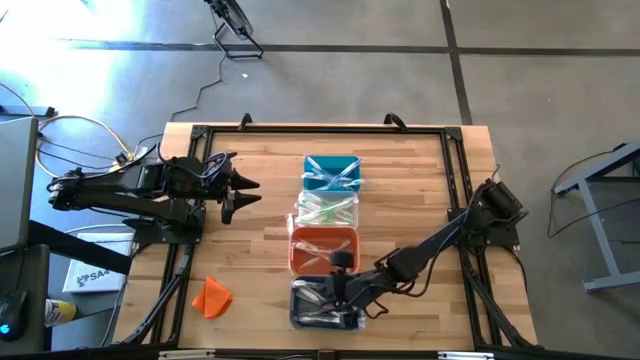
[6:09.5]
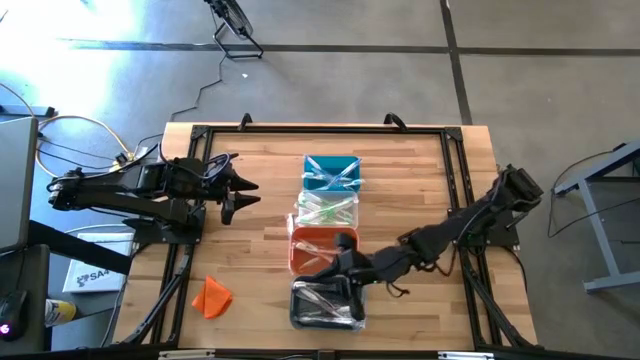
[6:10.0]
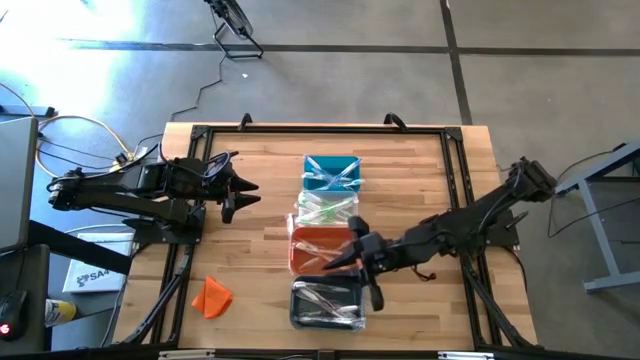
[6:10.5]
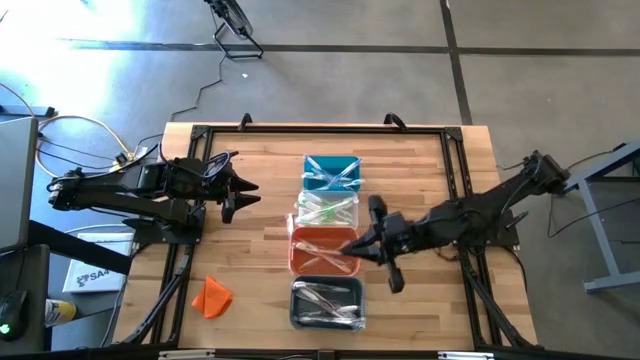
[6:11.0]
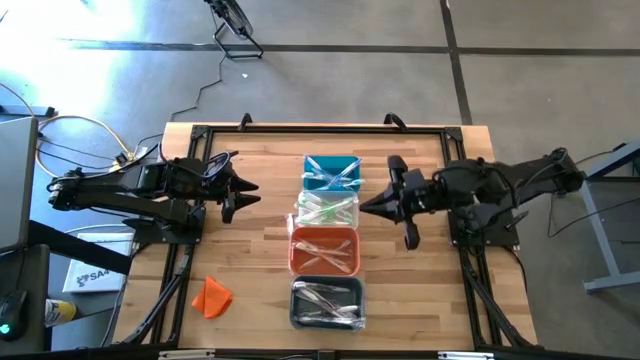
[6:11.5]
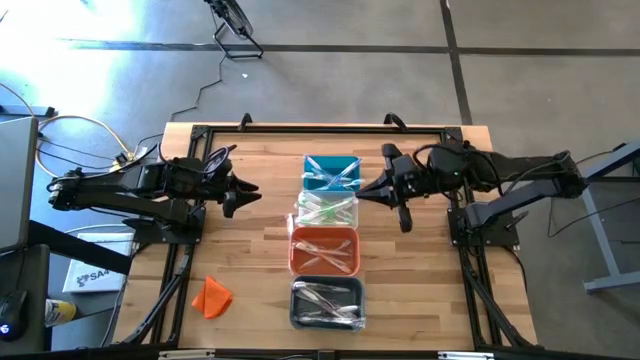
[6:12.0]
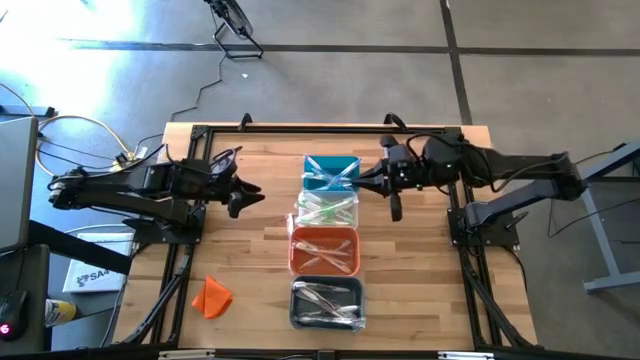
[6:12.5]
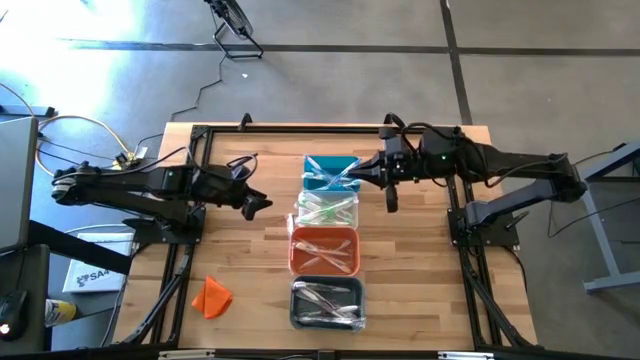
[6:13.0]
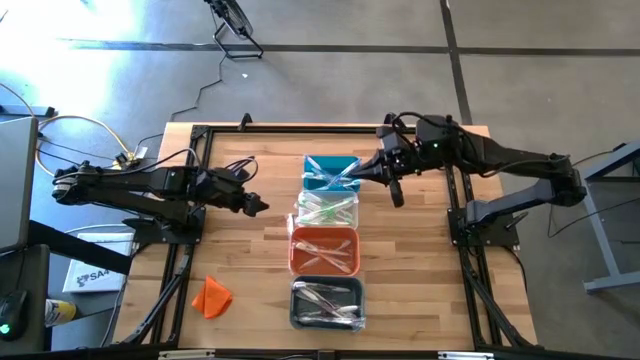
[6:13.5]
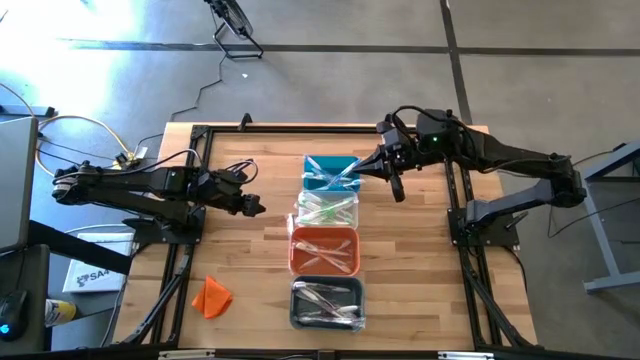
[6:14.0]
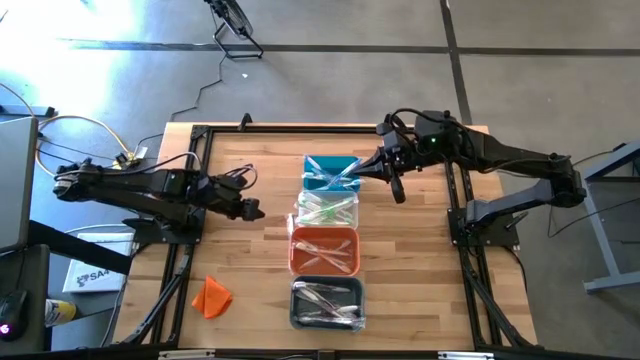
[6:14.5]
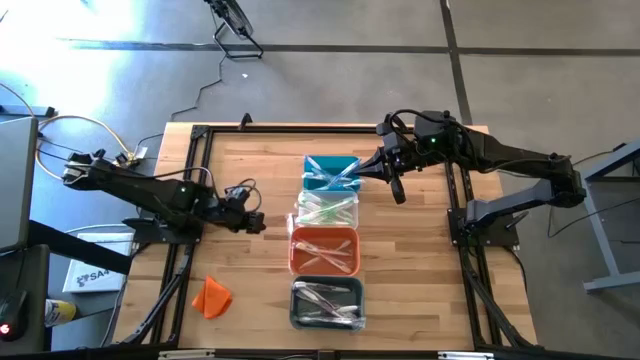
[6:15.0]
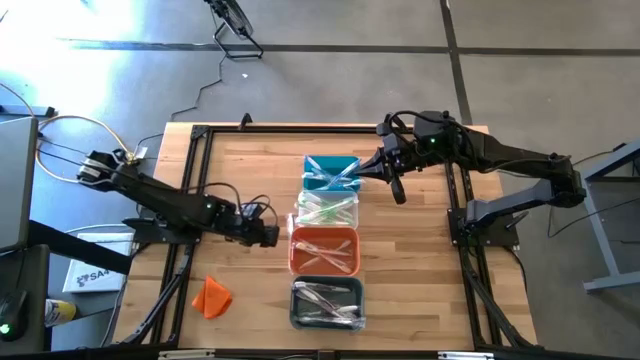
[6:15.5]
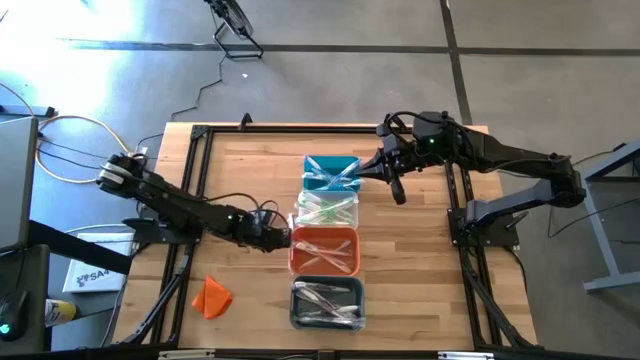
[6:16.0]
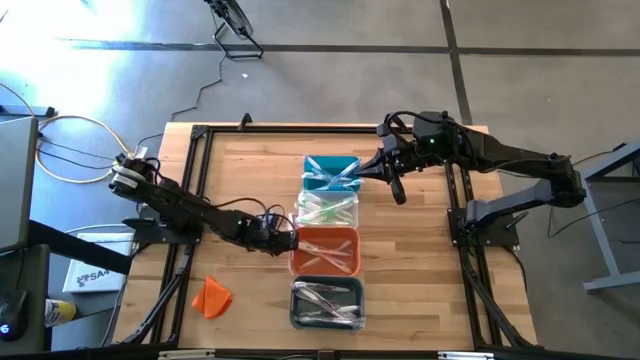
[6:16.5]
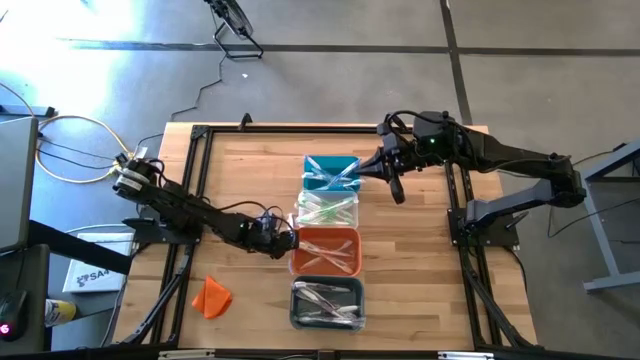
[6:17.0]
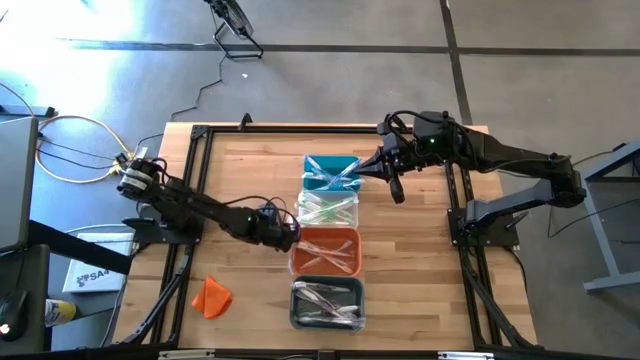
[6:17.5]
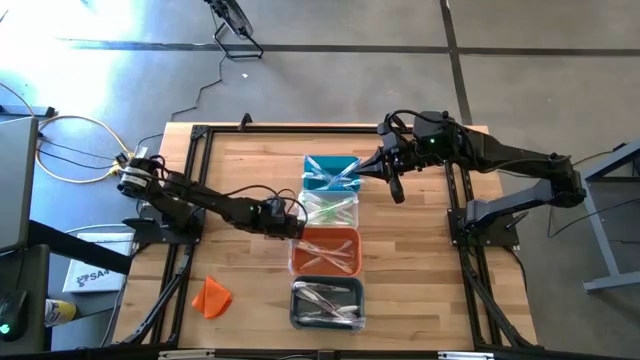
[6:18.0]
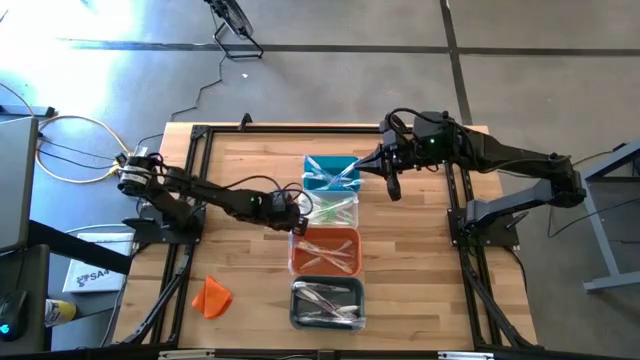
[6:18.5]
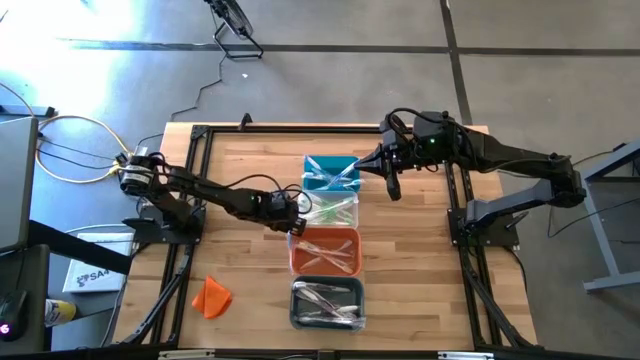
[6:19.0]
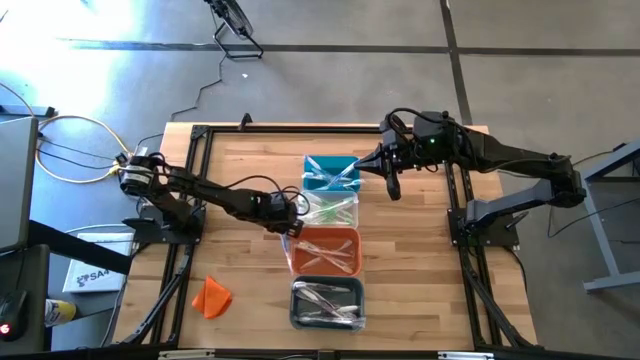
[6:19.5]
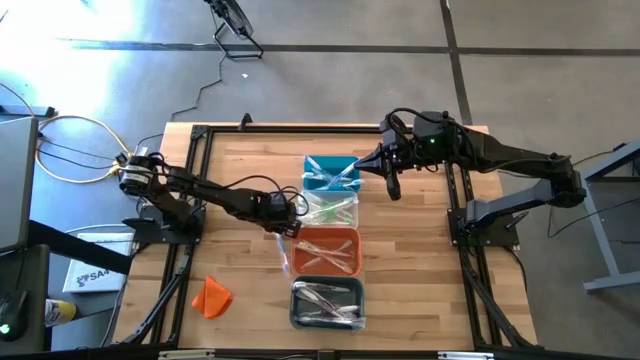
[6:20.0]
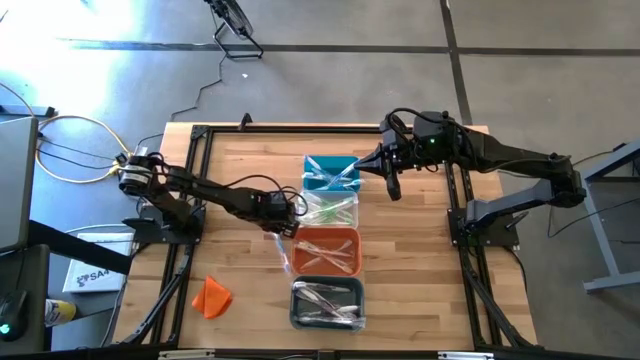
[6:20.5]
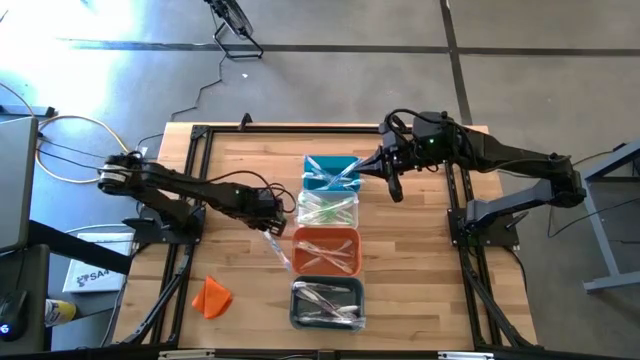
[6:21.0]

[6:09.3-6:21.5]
Task: Pick & Place Toothbrushes
Put the blue toothbrush into the blue bin

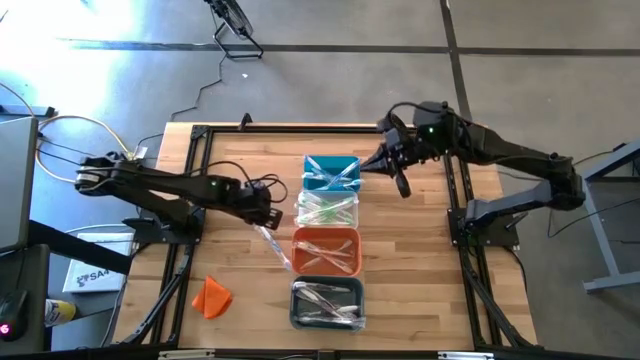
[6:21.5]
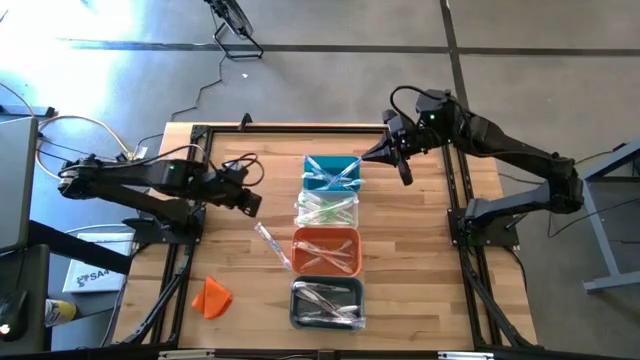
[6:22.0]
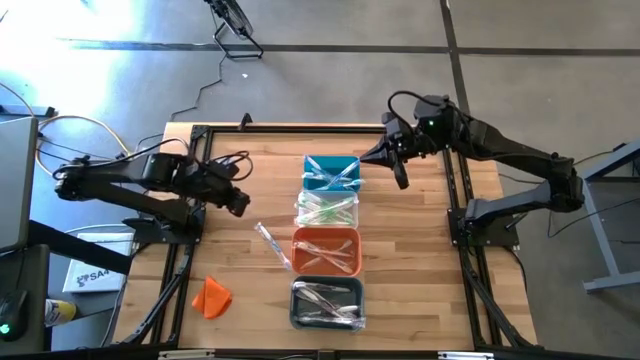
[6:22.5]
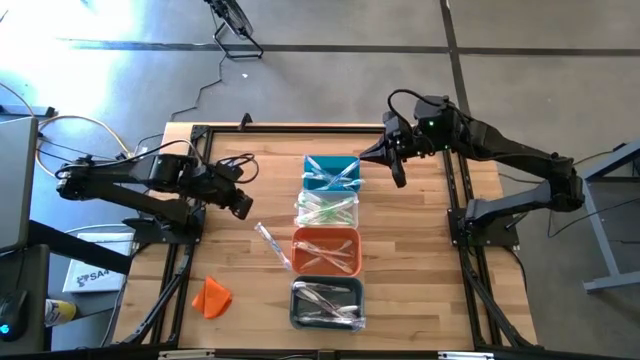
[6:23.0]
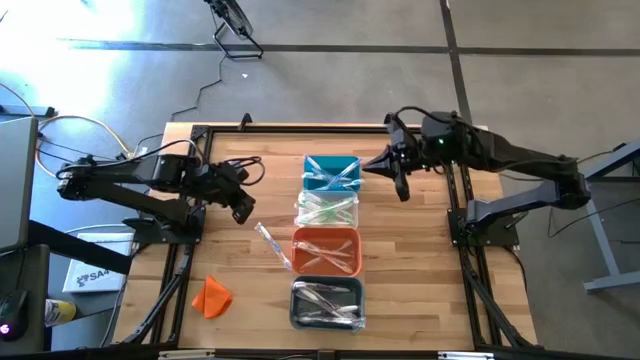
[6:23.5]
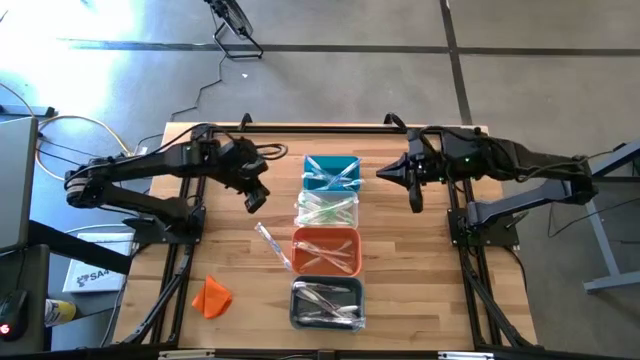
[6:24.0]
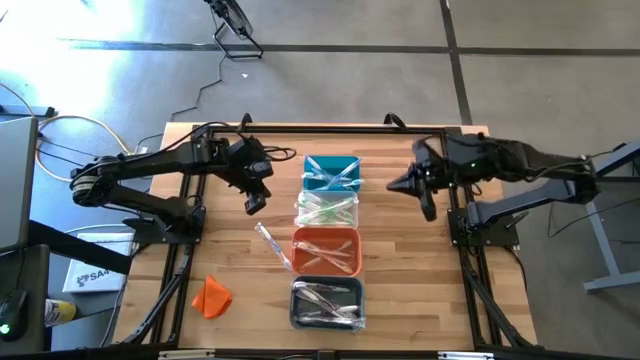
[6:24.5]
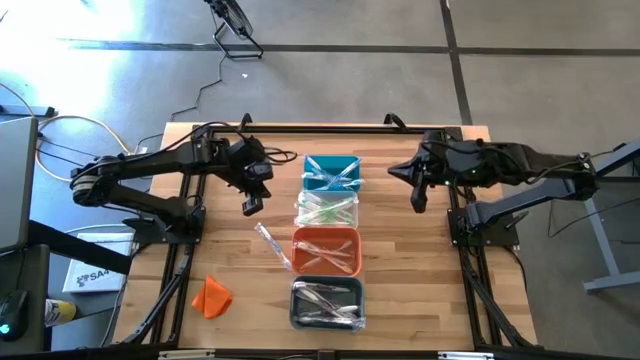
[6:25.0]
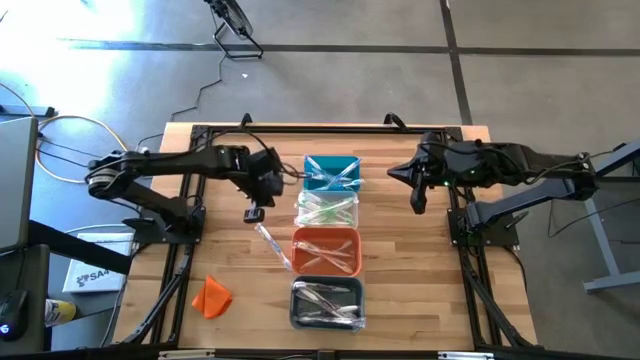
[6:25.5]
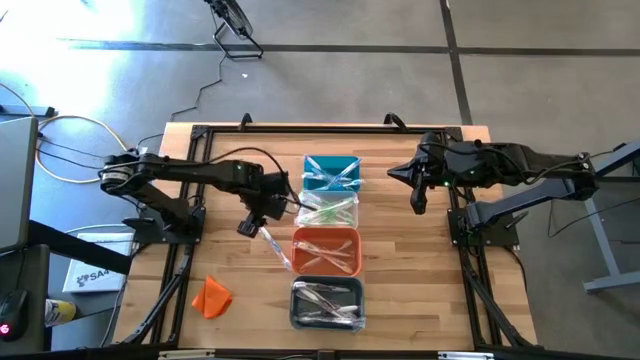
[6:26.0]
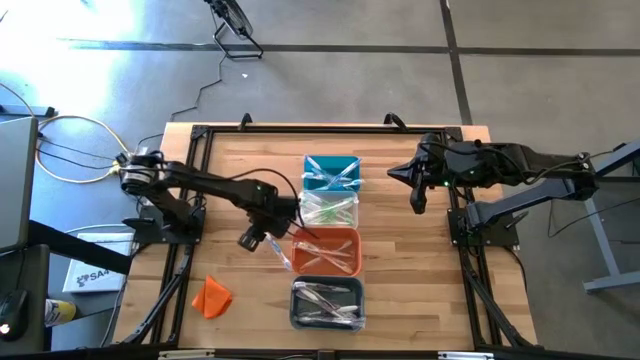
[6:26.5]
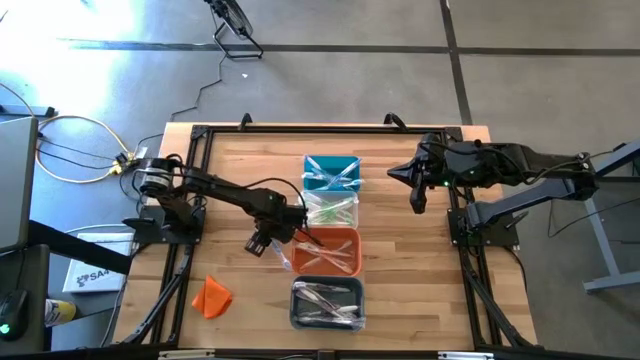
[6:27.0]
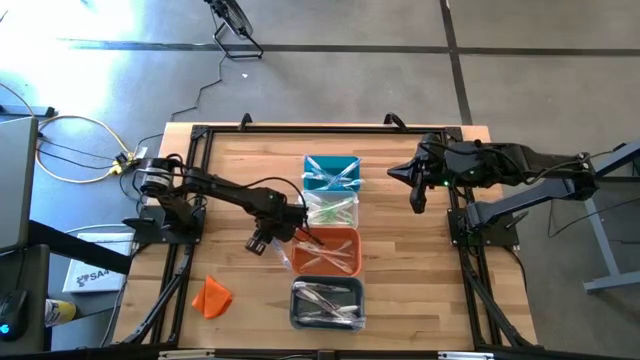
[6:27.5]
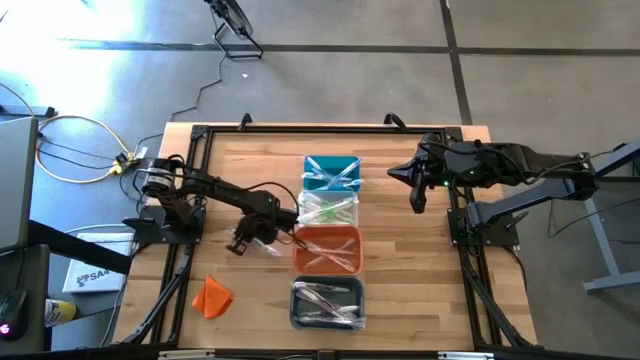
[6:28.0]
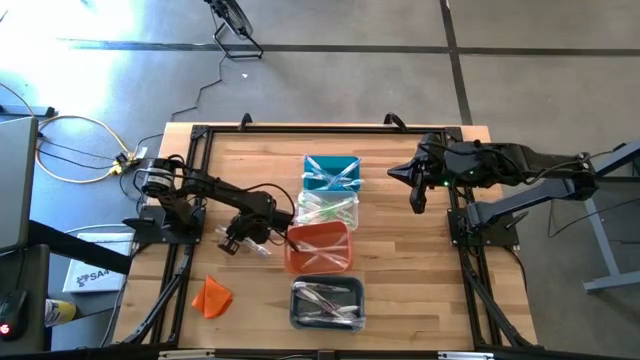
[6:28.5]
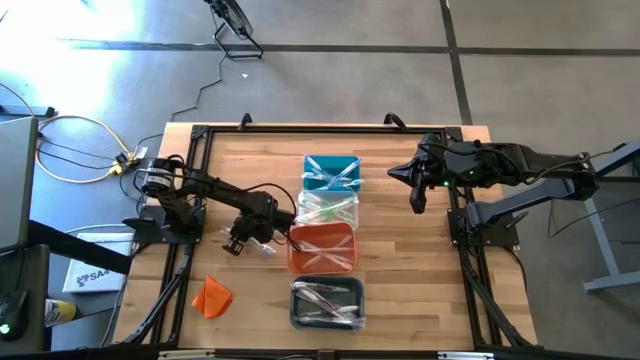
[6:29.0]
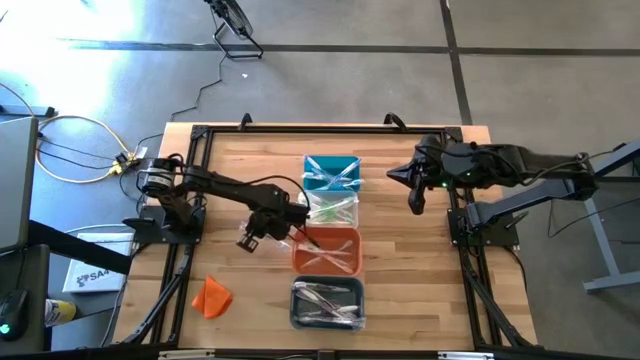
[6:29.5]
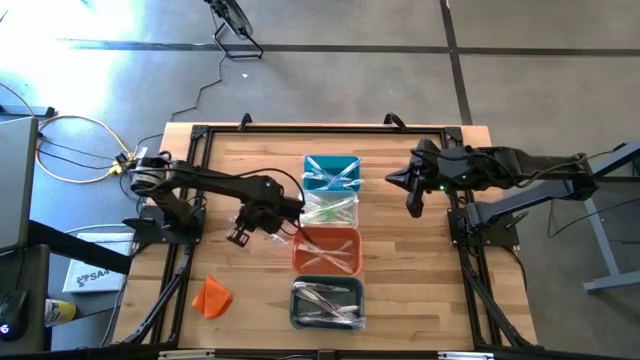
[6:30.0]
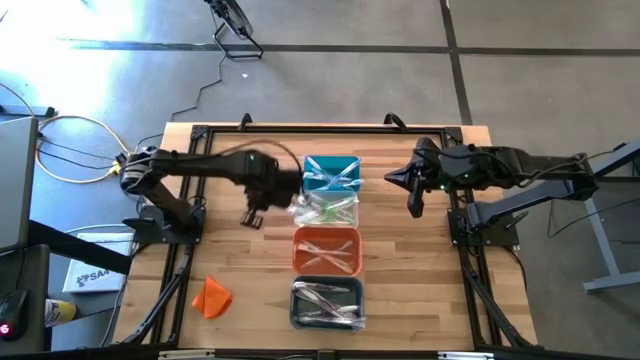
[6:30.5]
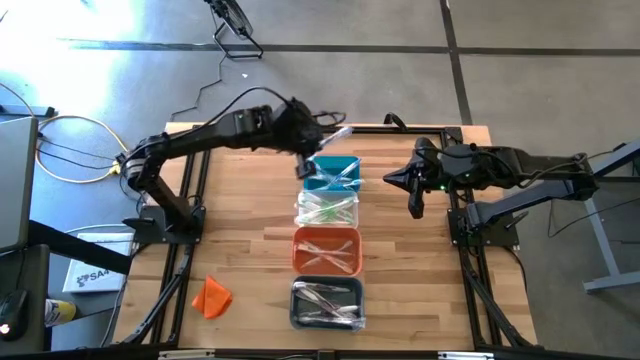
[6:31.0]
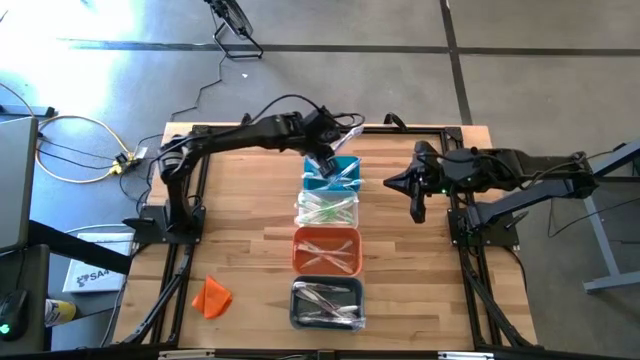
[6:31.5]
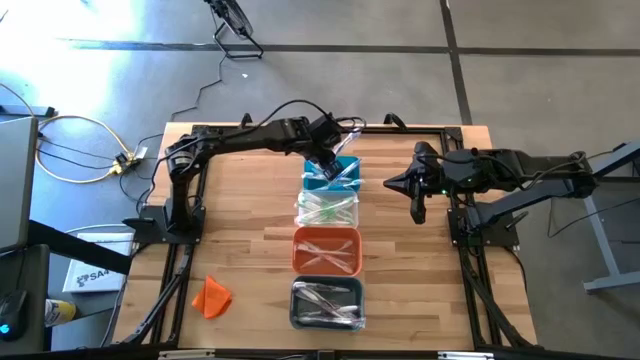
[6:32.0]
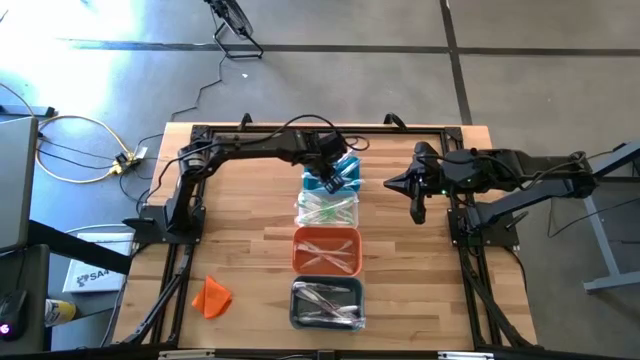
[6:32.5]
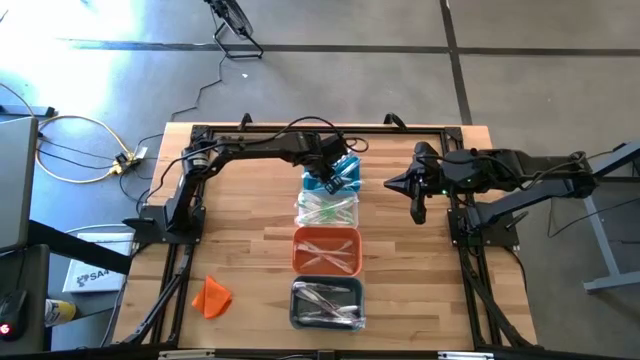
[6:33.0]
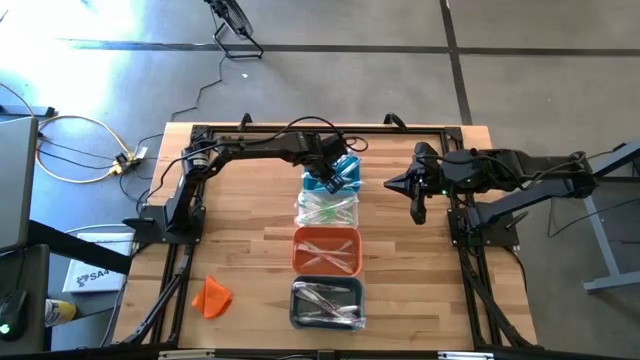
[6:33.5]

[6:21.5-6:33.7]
Put the blue toothbrush into the blue bin
